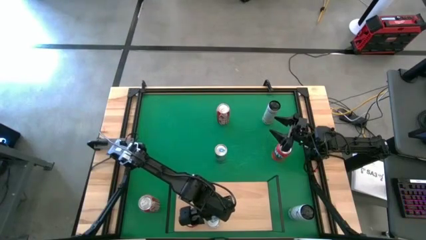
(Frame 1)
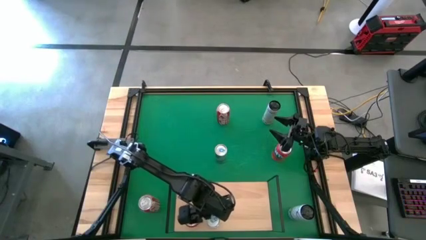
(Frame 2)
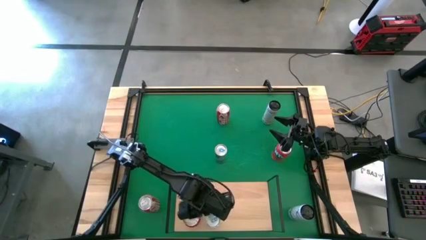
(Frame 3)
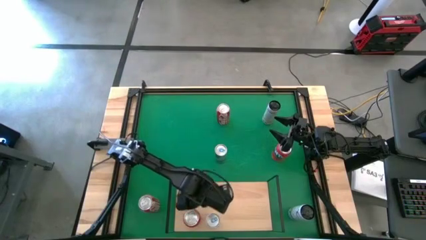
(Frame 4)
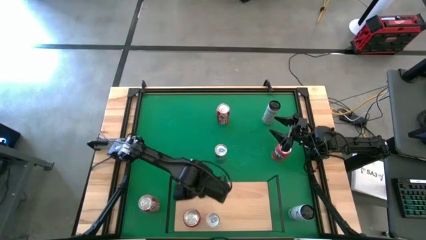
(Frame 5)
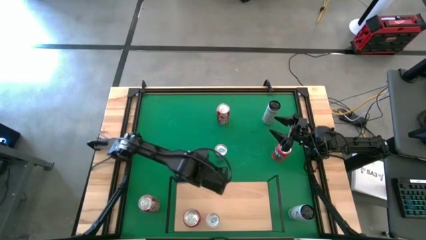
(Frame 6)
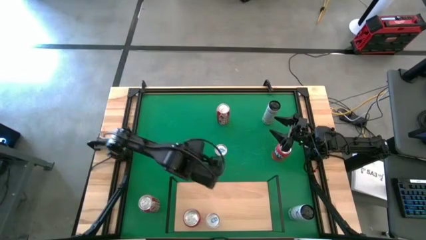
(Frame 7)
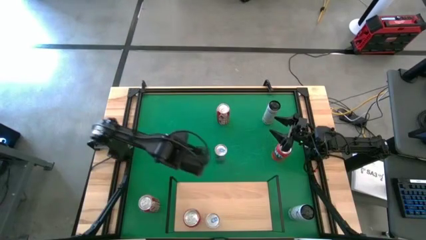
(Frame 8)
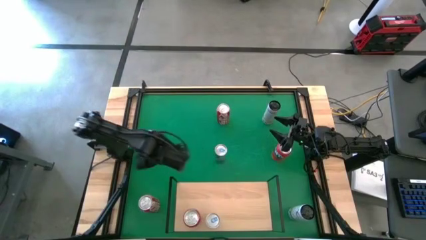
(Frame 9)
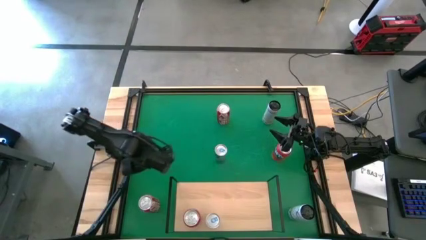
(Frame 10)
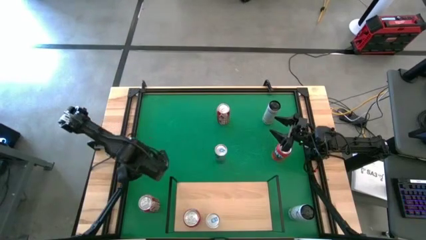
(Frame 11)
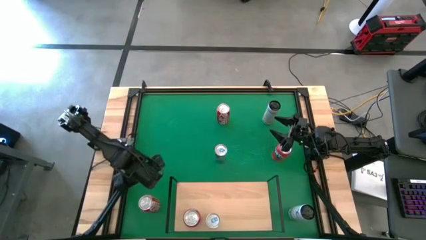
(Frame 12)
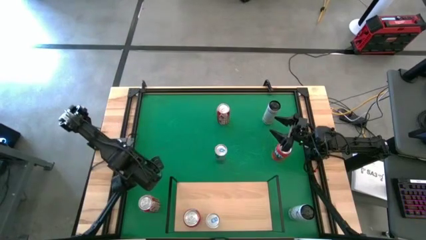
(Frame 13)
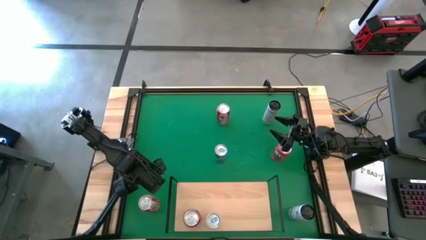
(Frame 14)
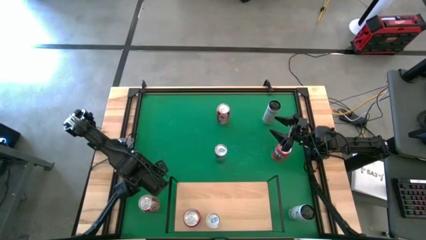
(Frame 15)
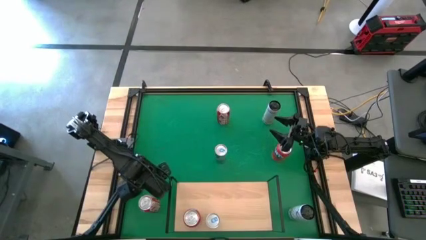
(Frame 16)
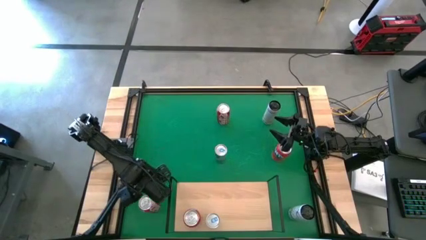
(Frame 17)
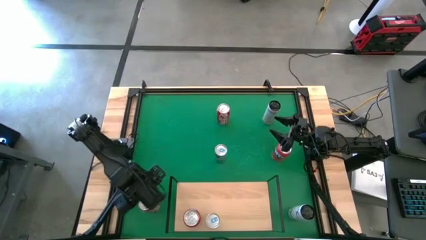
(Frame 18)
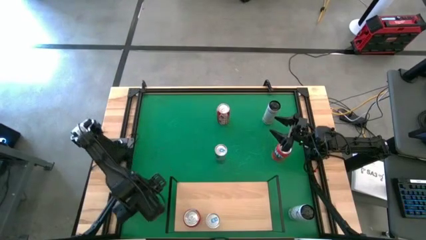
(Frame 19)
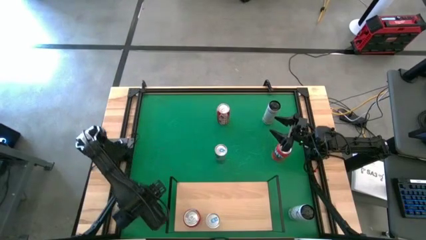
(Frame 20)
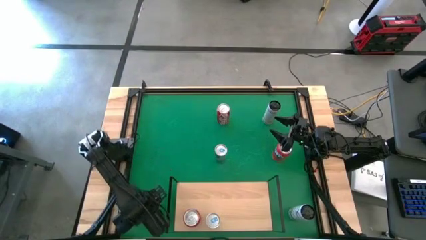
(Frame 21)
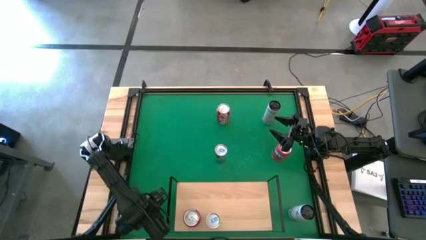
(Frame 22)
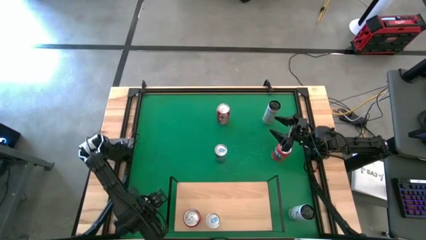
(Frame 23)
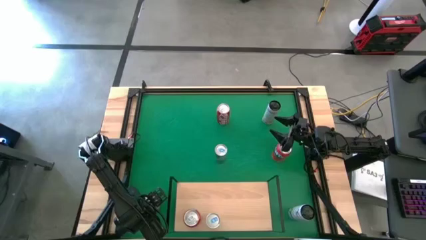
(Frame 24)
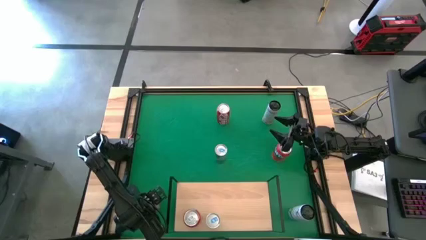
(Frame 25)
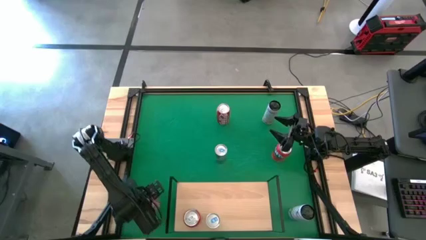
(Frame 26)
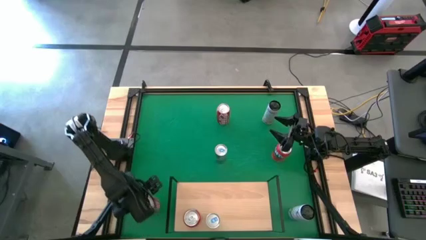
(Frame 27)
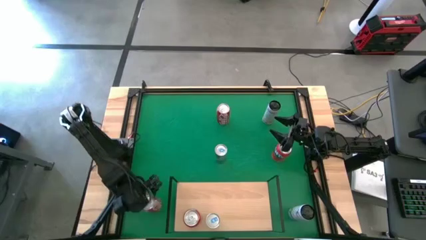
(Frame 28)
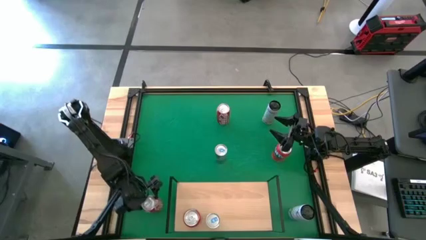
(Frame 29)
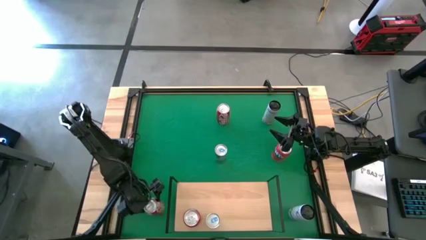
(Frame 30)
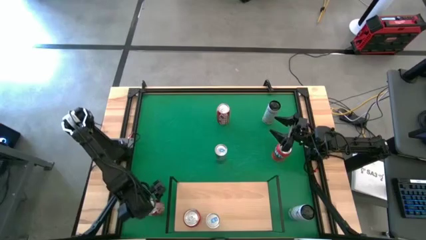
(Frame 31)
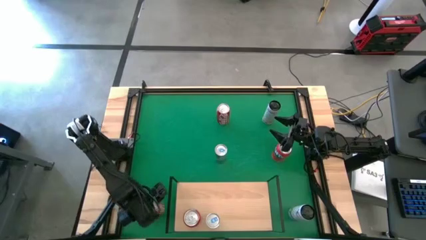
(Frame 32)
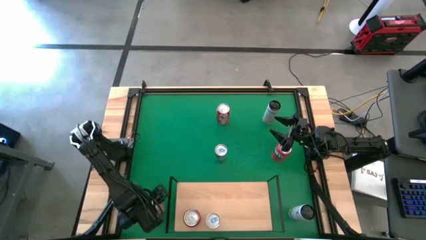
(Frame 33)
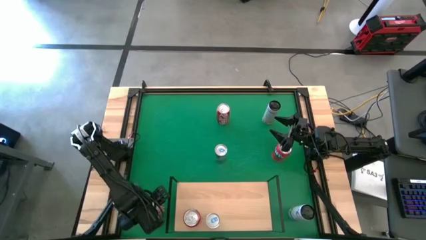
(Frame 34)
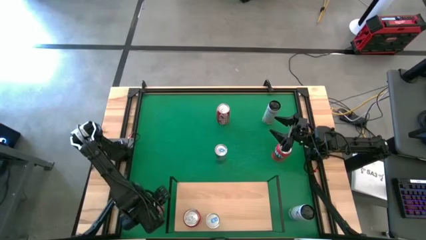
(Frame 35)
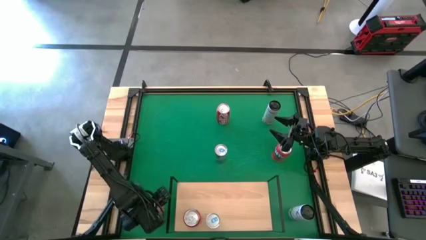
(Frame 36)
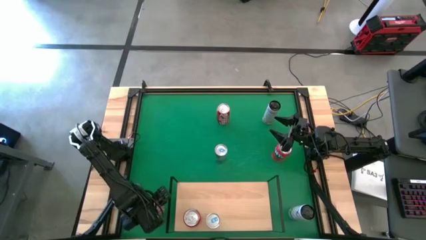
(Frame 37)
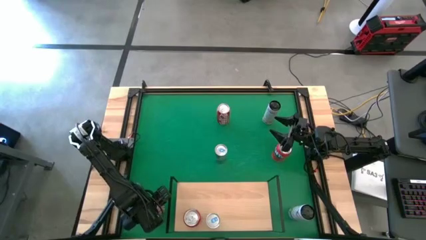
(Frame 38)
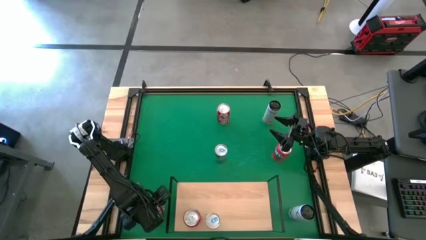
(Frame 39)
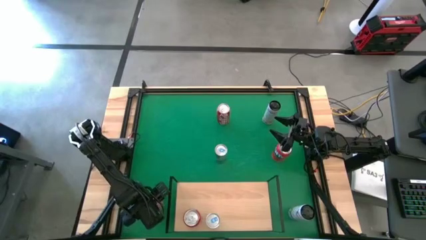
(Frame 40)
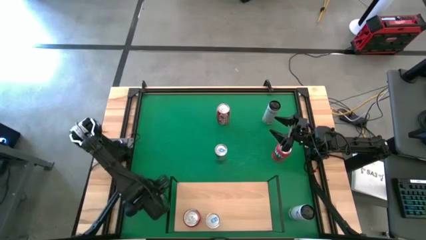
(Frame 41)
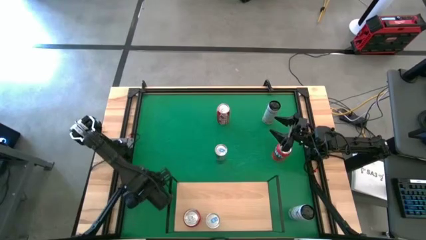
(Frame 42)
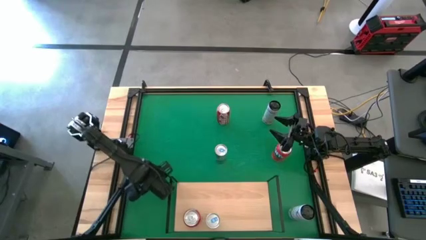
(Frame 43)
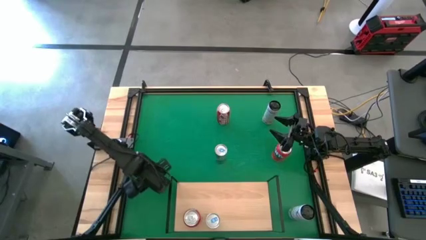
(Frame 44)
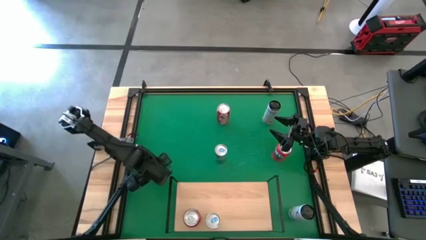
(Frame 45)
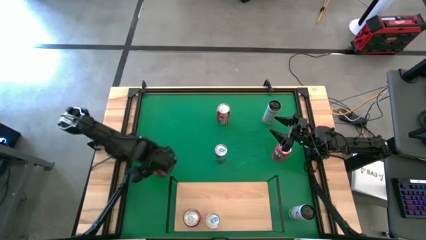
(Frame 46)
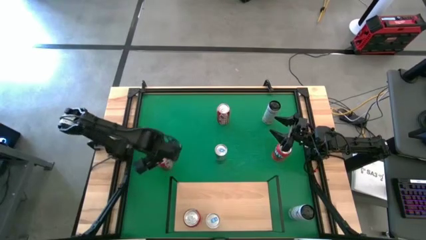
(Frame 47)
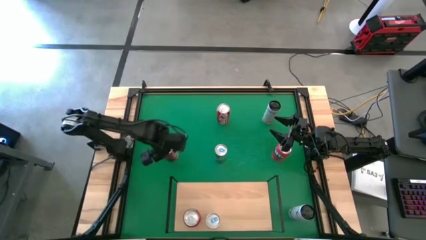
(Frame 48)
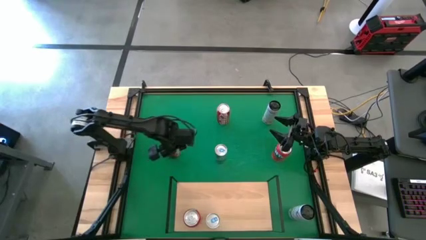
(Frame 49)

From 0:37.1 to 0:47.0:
Task: Place canned beverage on shelf
Put the bottom red soda can on the shelf
